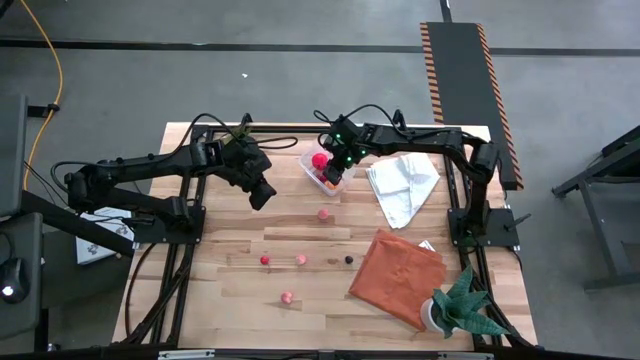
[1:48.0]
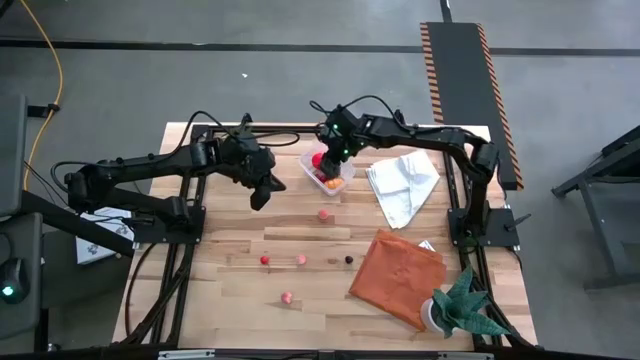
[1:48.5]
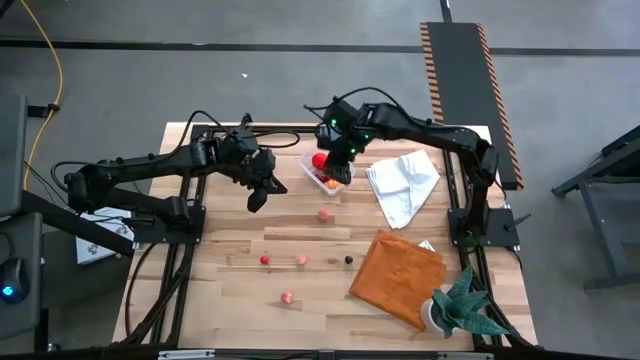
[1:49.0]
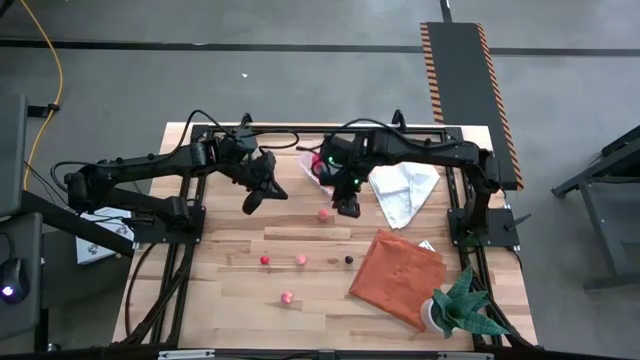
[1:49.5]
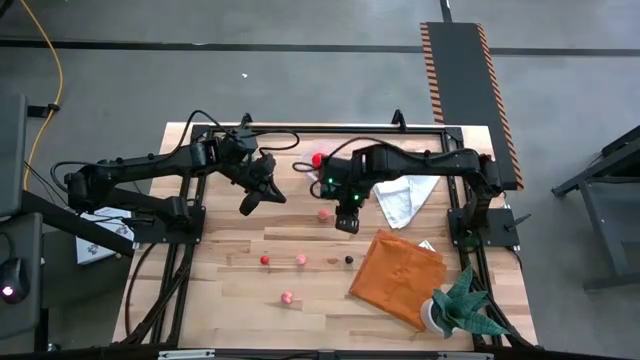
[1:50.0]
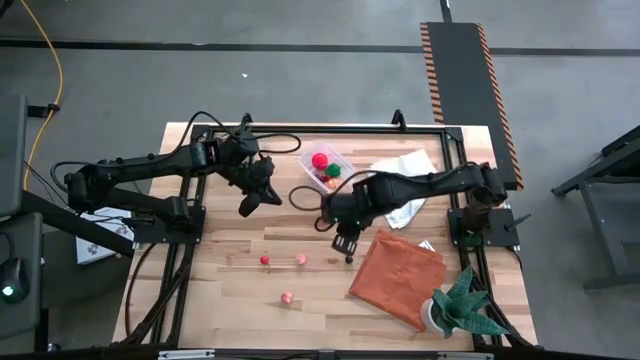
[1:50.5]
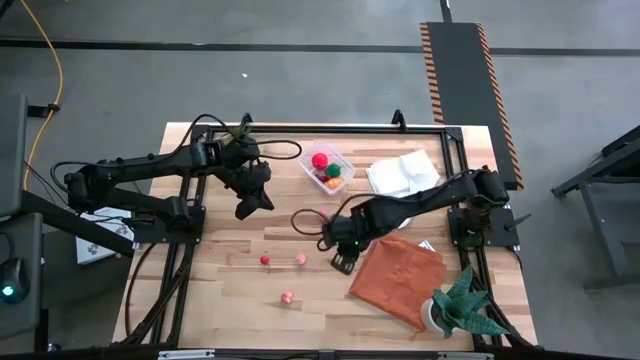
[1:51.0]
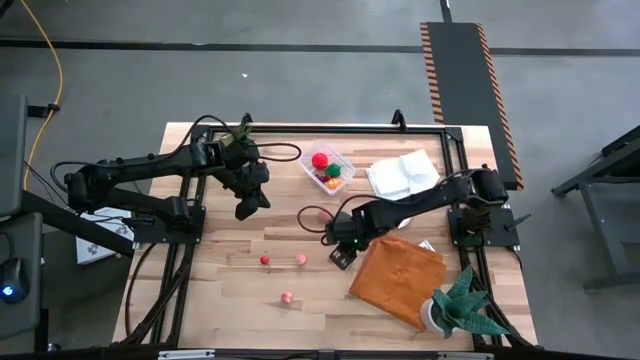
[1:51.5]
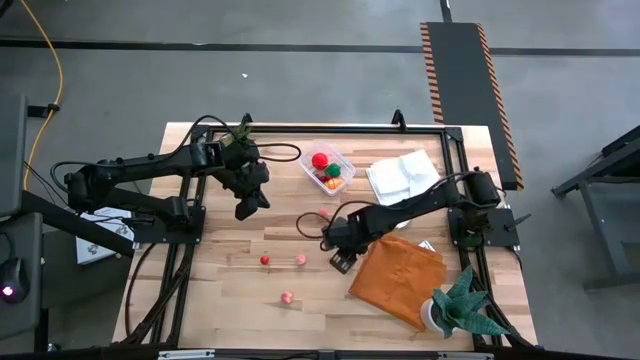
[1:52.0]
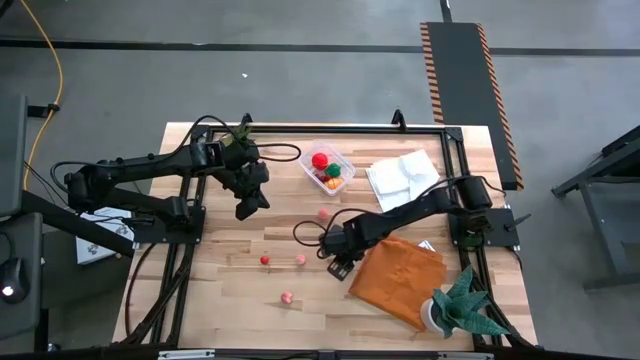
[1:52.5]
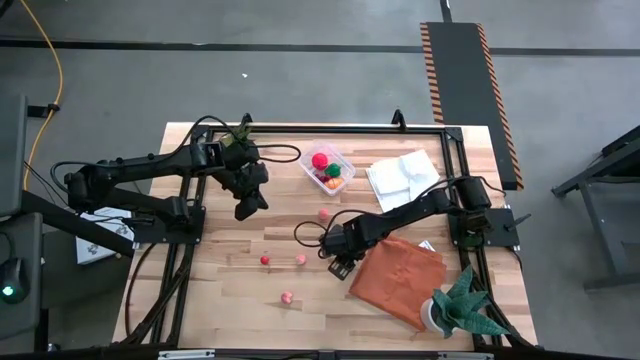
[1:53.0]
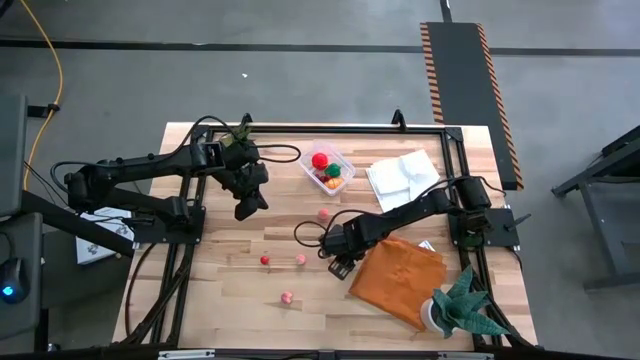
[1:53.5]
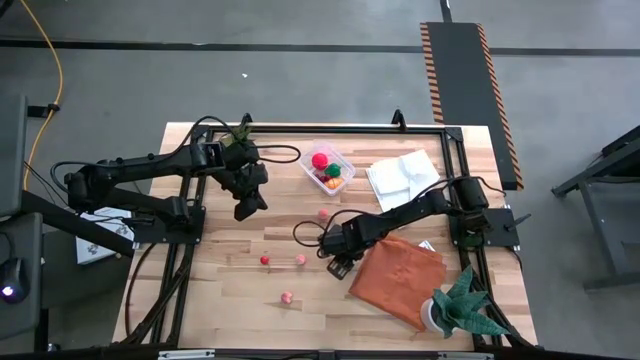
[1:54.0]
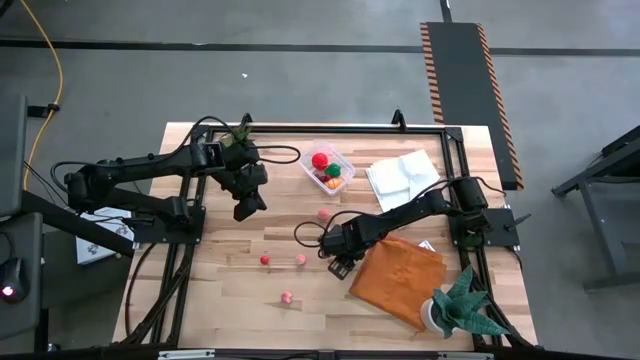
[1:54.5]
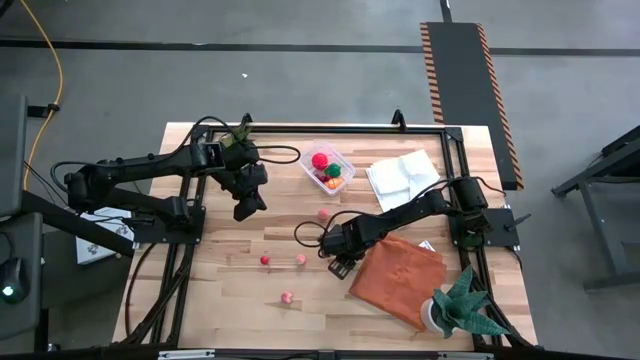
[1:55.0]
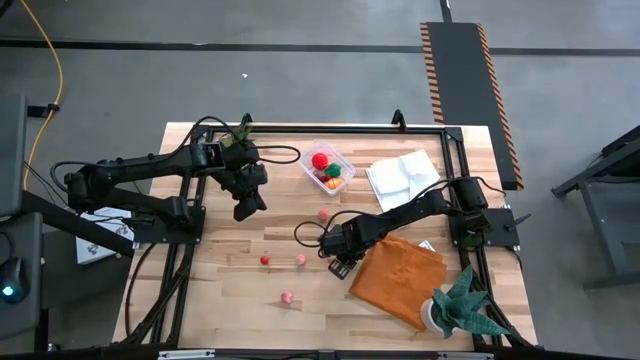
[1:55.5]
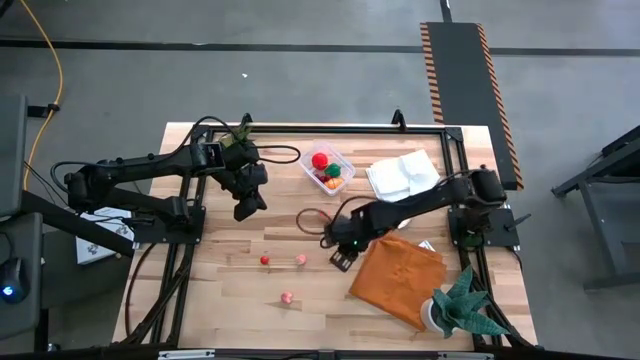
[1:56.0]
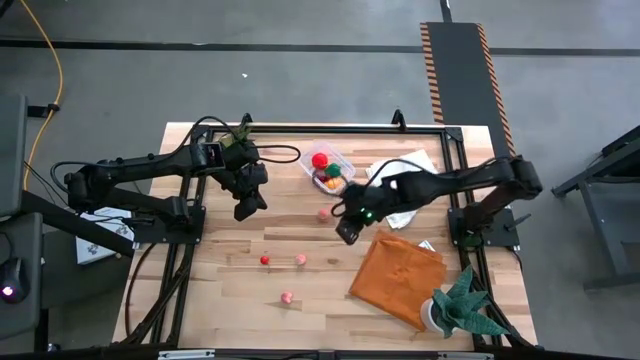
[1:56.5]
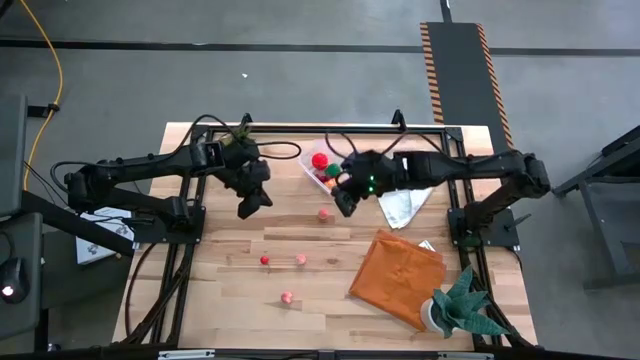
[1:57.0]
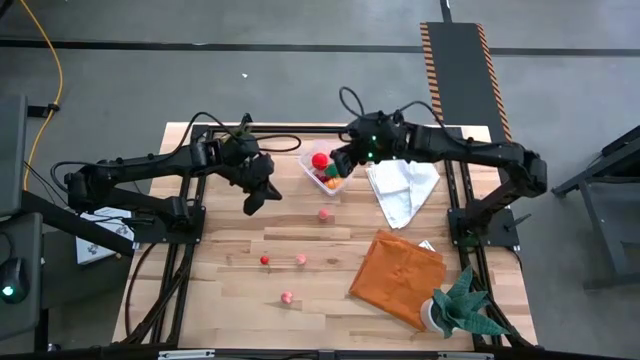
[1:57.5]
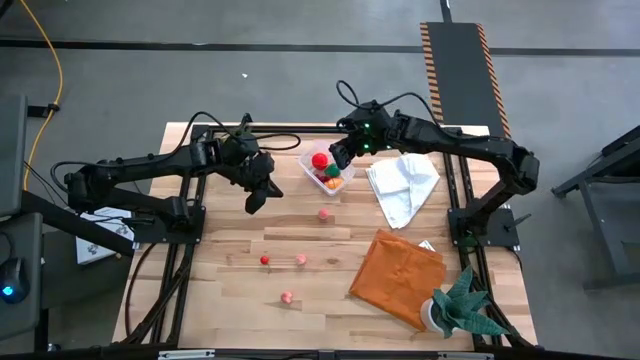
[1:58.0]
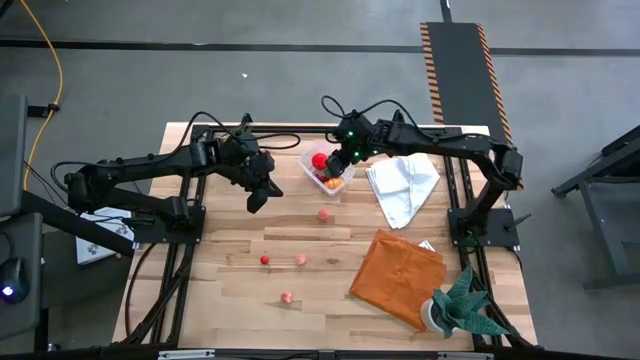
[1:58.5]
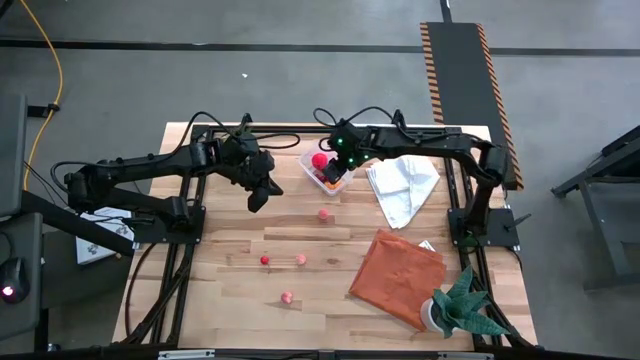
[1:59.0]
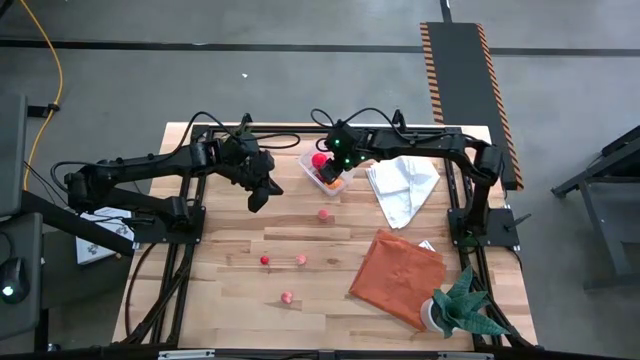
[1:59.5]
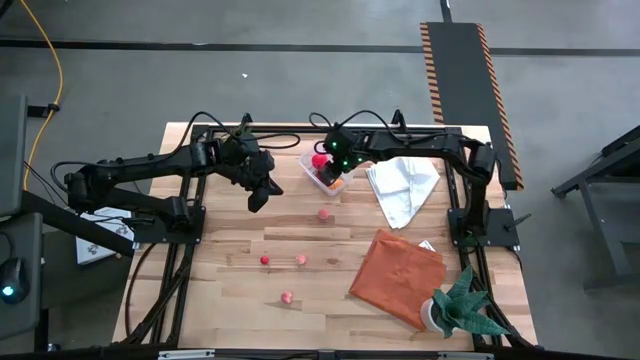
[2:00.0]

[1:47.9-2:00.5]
Task: Pick and placing Produce into tupperware
Put the black cherry into the transparent bin

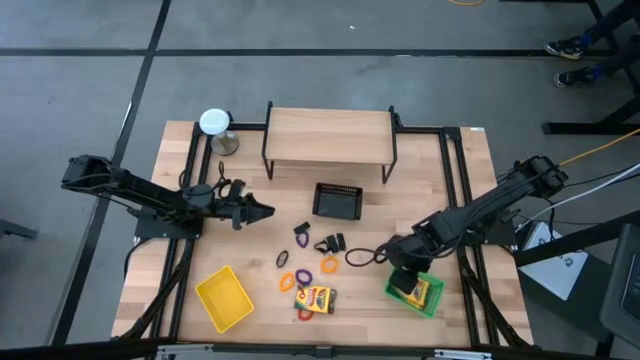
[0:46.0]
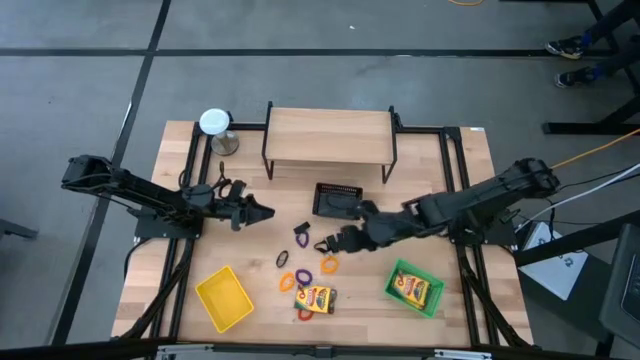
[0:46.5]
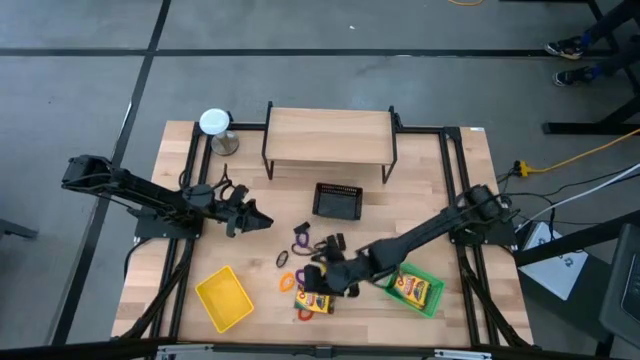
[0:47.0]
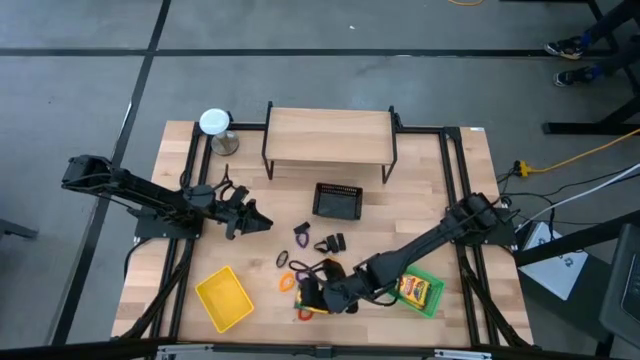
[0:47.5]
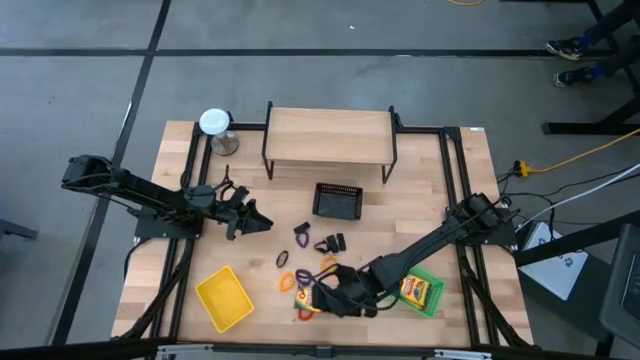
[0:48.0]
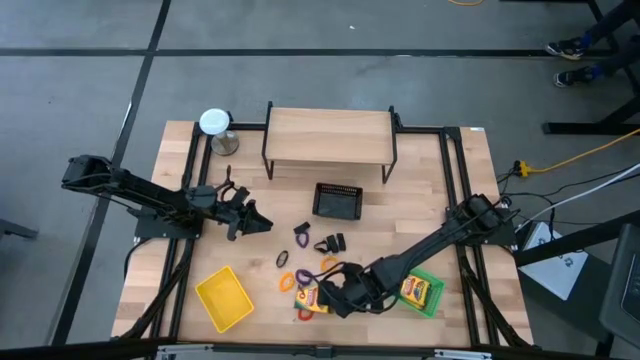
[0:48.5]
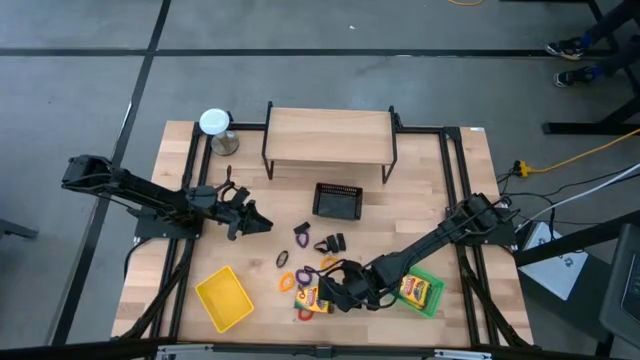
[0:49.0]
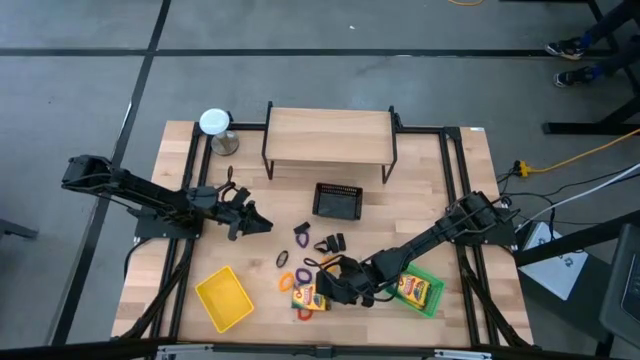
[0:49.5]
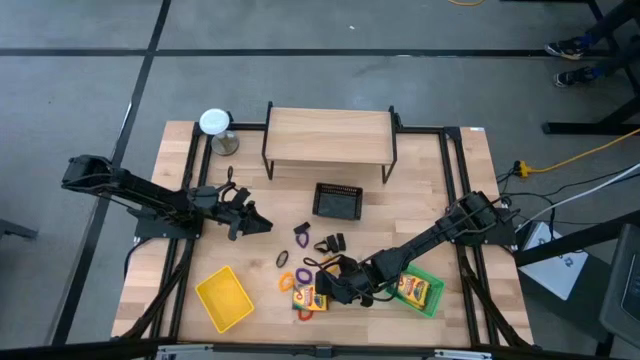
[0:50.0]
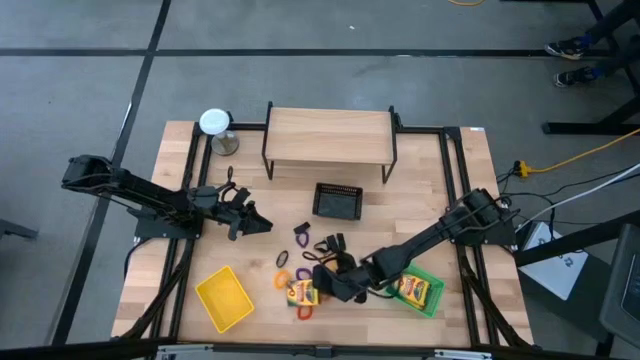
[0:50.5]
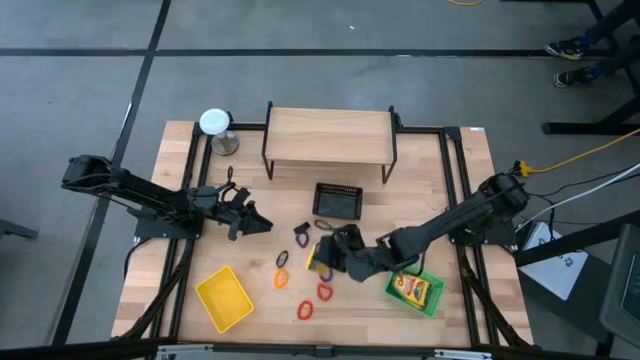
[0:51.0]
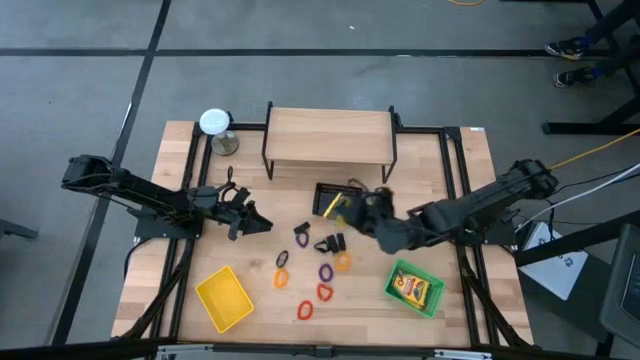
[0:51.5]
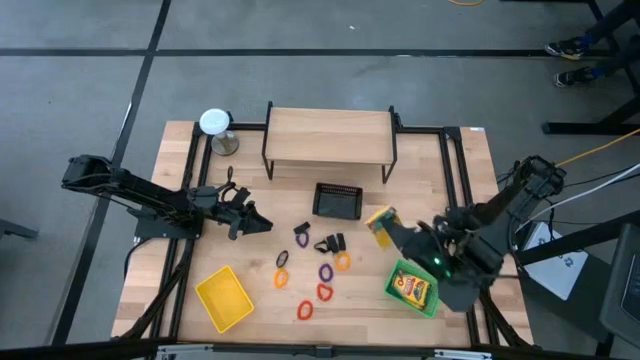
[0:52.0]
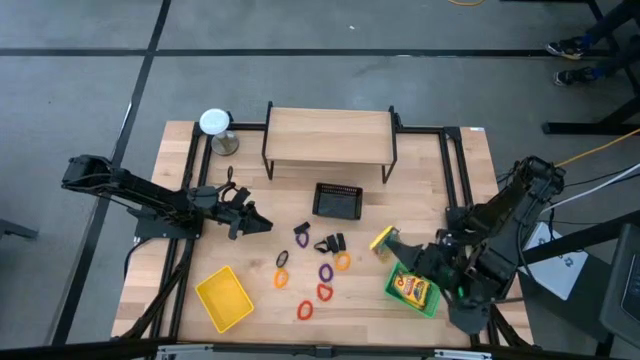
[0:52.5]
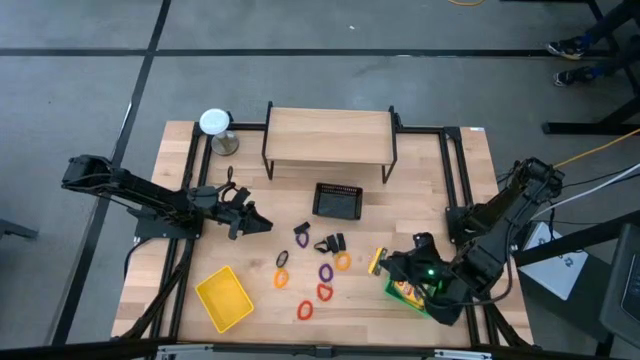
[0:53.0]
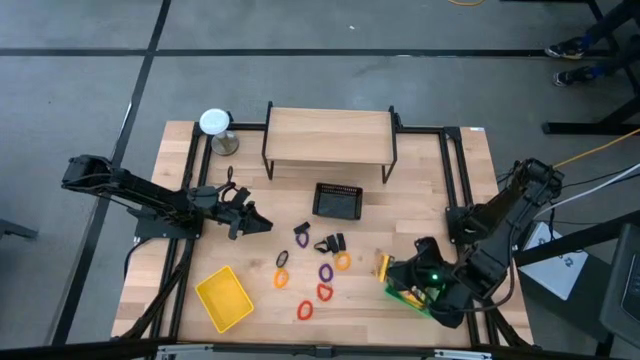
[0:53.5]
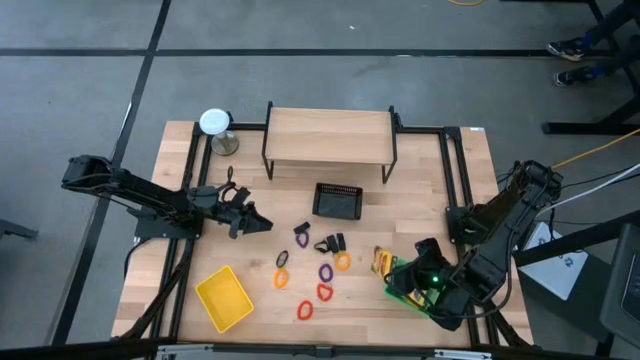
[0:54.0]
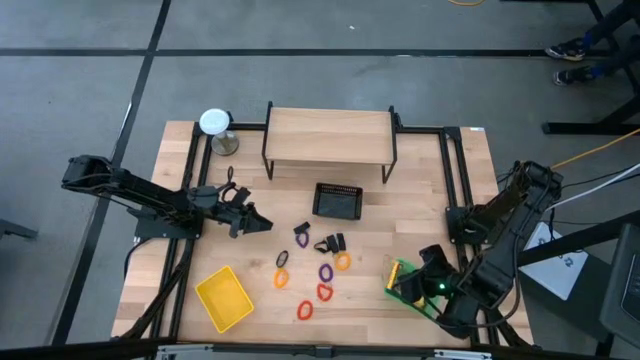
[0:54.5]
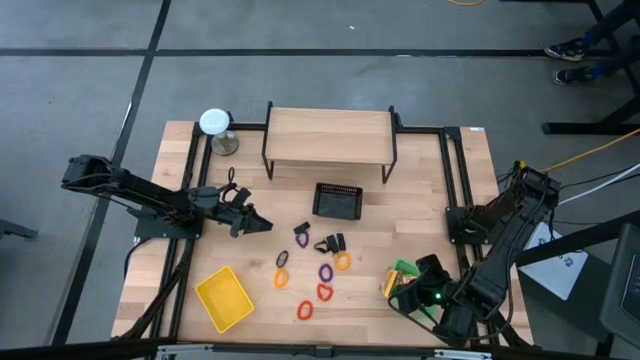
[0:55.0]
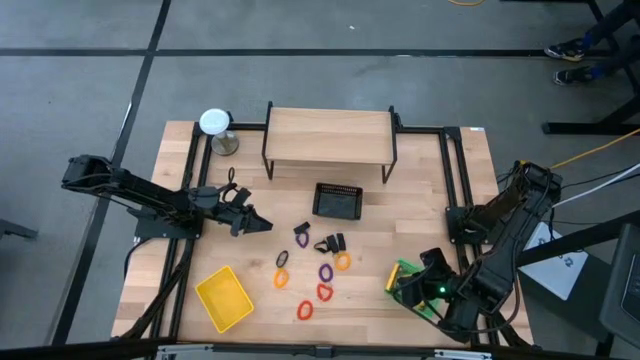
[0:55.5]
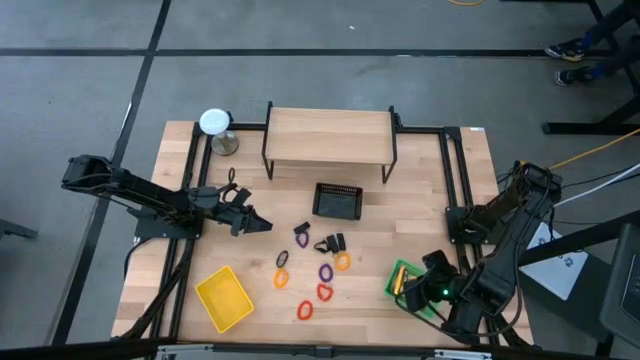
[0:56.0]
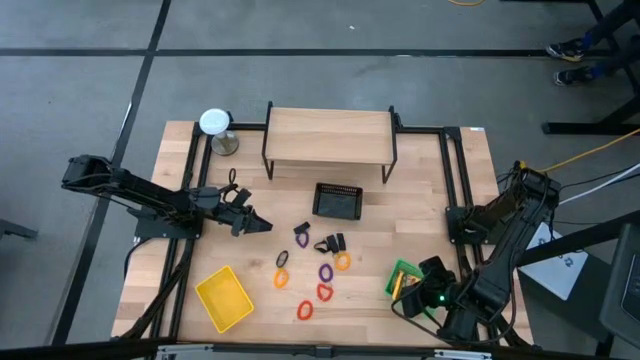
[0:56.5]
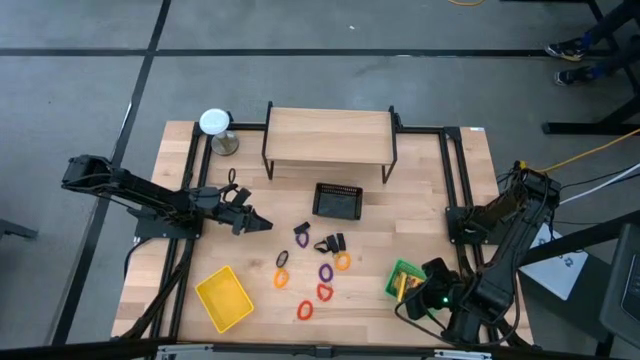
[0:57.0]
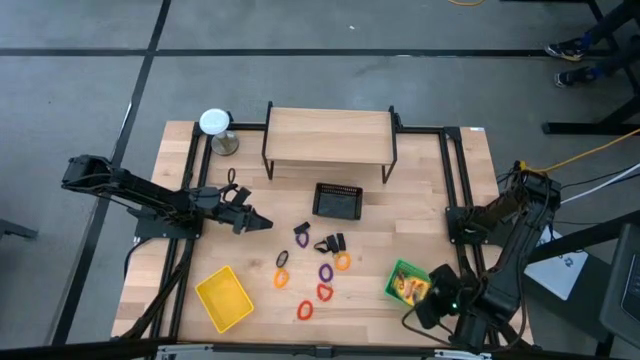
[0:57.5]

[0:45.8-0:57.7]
Task: Pick & Place Office Desk Supplies
Stack the crayon box on top of the crayon box in the green basket
